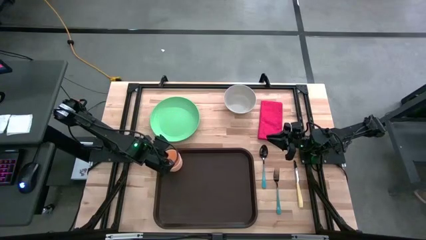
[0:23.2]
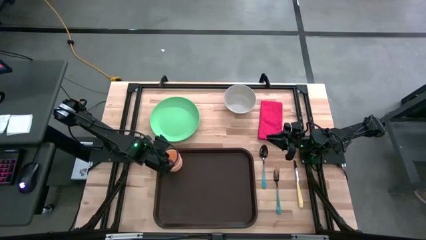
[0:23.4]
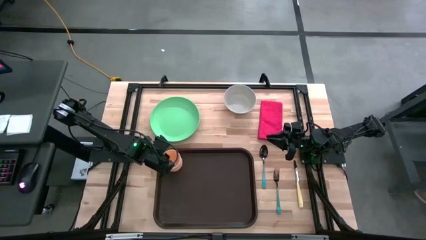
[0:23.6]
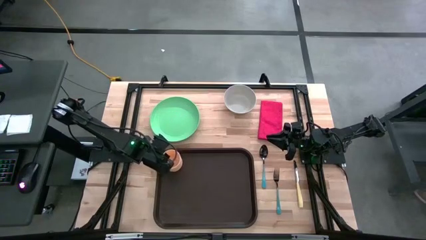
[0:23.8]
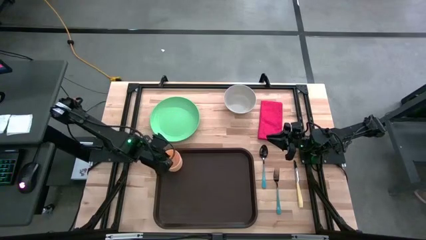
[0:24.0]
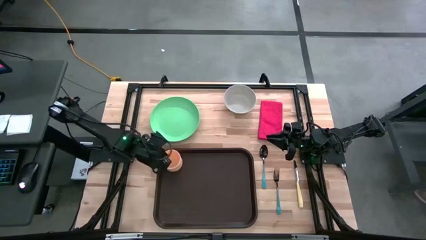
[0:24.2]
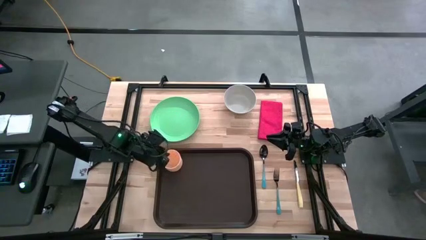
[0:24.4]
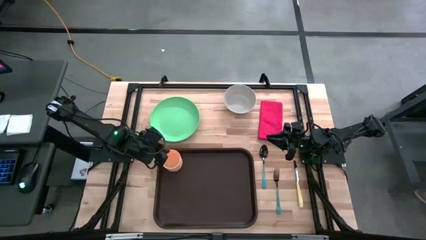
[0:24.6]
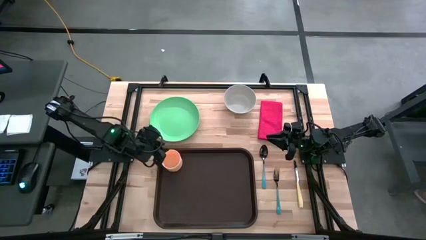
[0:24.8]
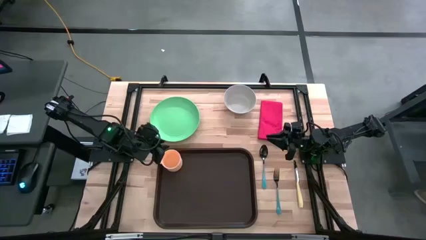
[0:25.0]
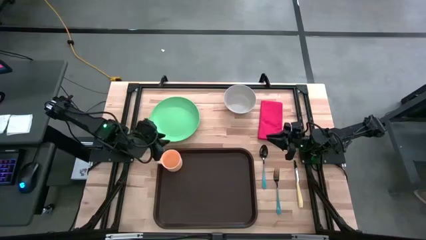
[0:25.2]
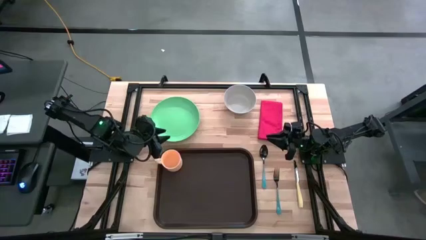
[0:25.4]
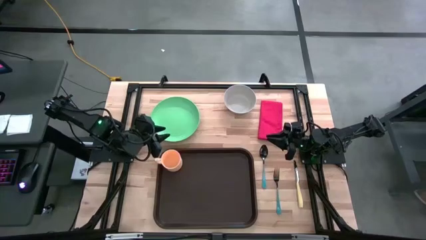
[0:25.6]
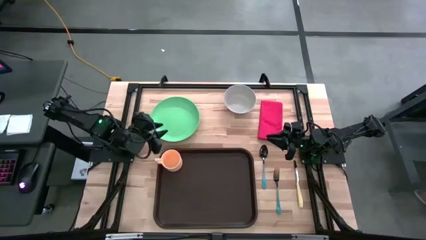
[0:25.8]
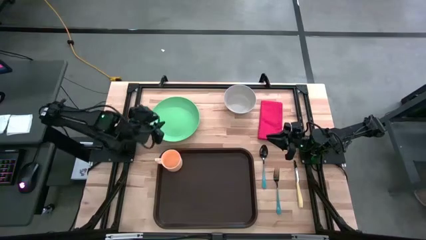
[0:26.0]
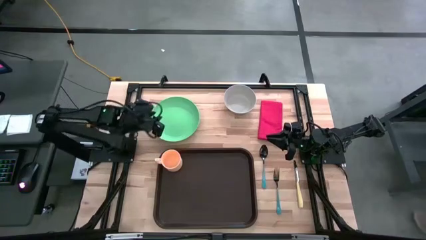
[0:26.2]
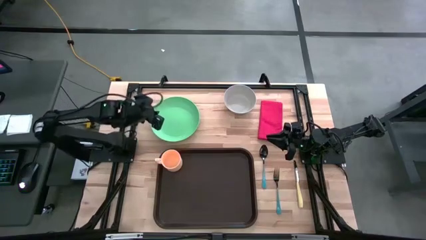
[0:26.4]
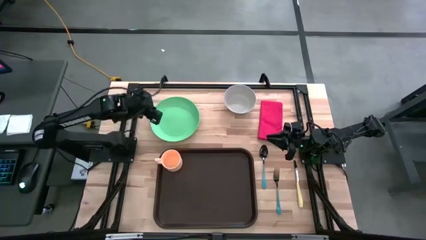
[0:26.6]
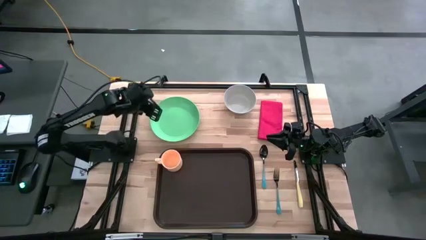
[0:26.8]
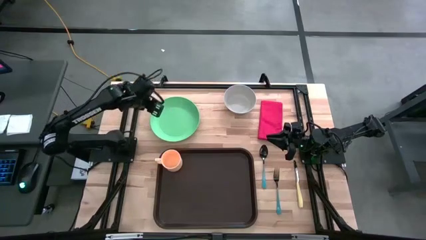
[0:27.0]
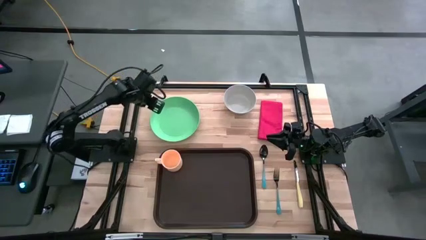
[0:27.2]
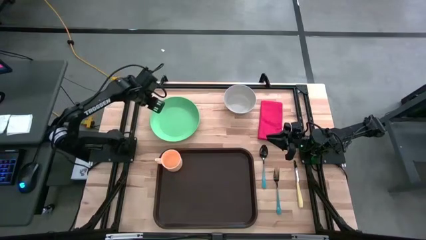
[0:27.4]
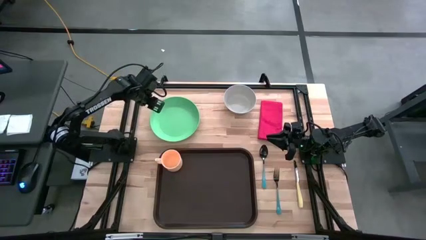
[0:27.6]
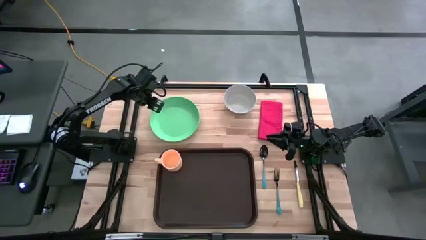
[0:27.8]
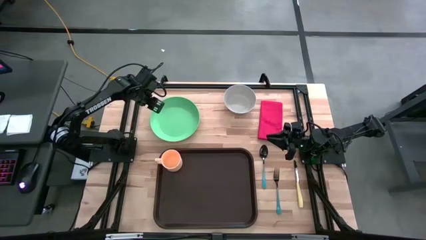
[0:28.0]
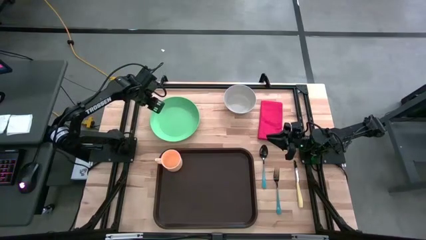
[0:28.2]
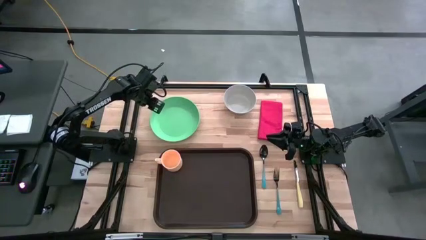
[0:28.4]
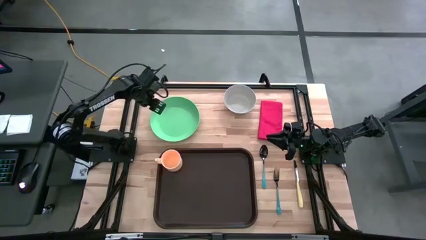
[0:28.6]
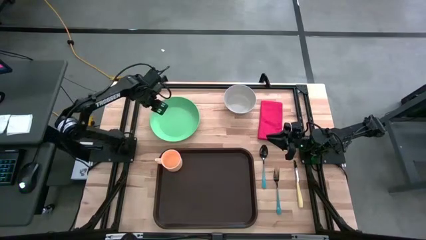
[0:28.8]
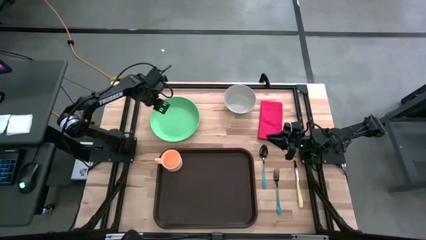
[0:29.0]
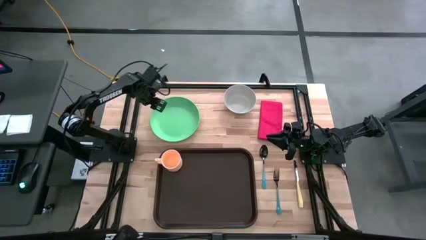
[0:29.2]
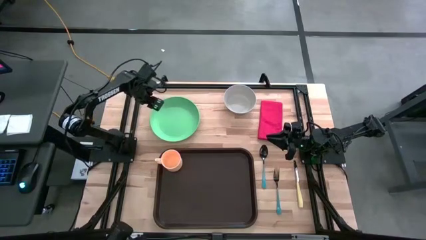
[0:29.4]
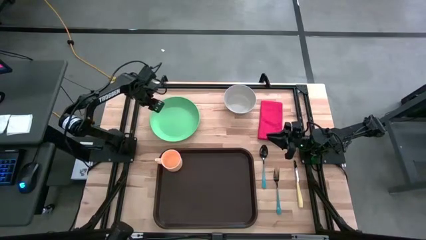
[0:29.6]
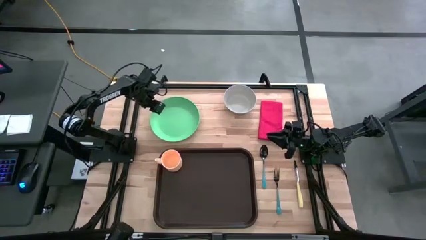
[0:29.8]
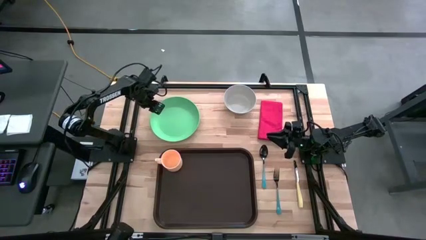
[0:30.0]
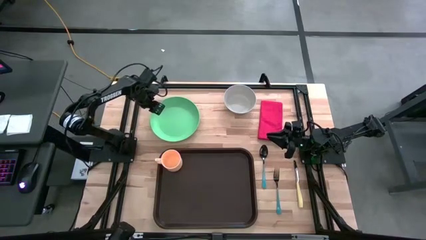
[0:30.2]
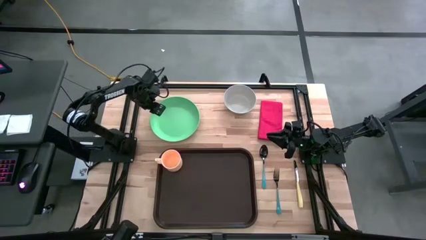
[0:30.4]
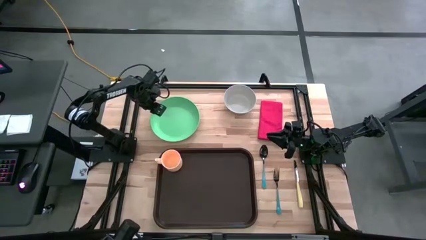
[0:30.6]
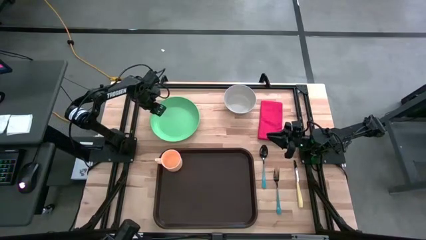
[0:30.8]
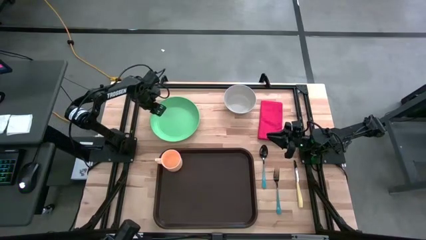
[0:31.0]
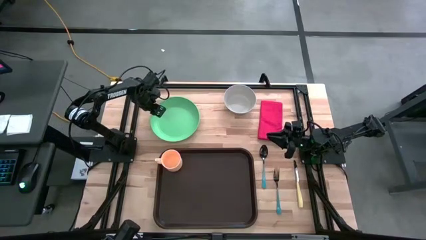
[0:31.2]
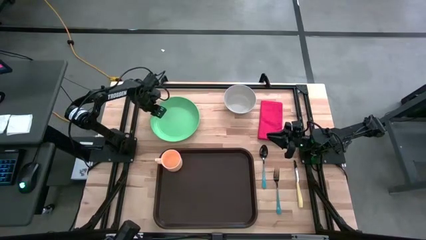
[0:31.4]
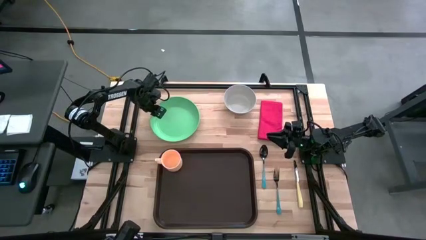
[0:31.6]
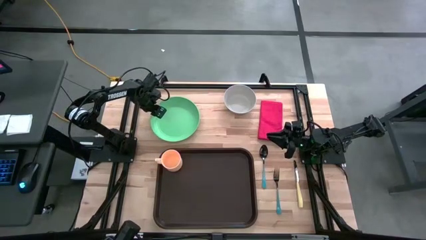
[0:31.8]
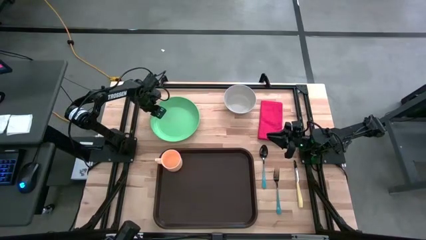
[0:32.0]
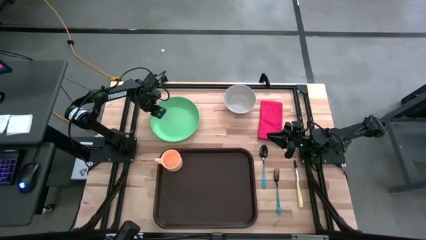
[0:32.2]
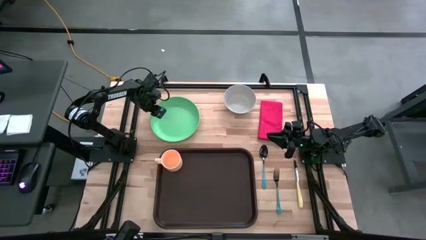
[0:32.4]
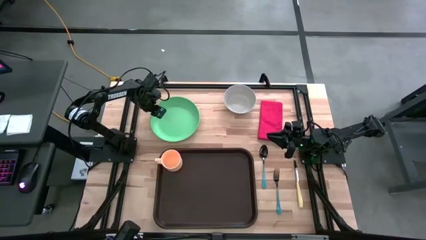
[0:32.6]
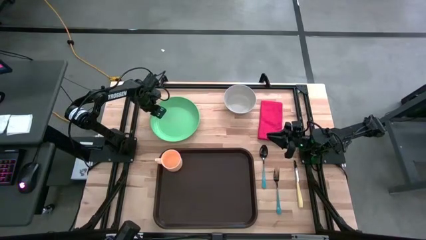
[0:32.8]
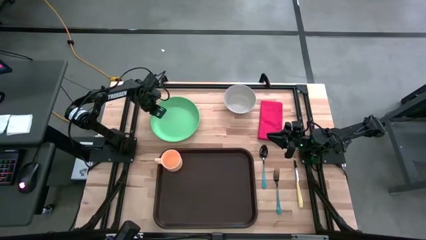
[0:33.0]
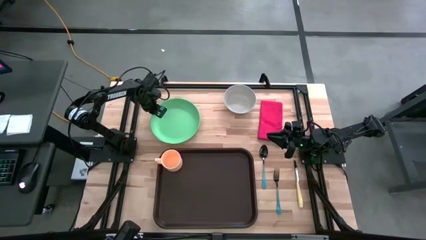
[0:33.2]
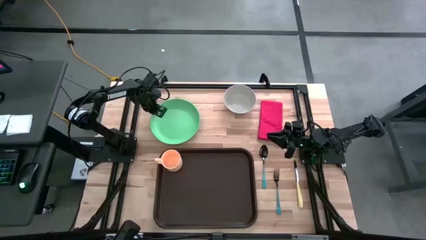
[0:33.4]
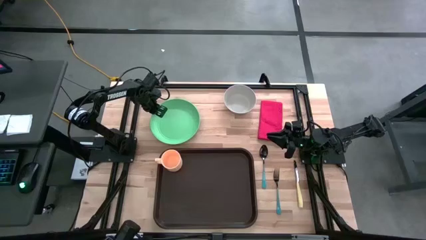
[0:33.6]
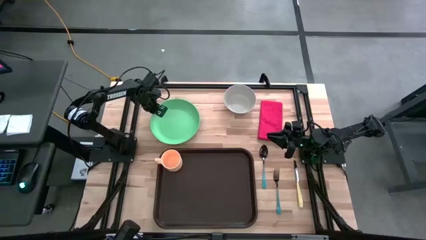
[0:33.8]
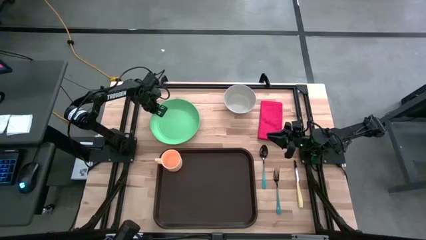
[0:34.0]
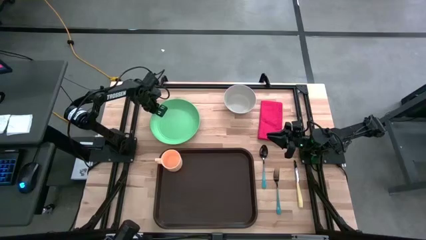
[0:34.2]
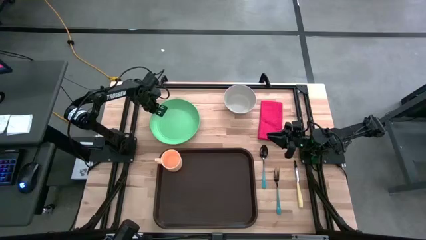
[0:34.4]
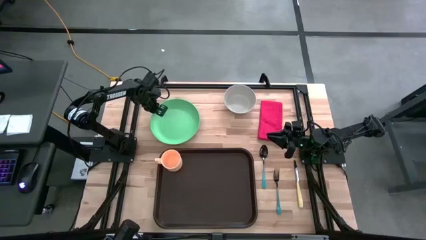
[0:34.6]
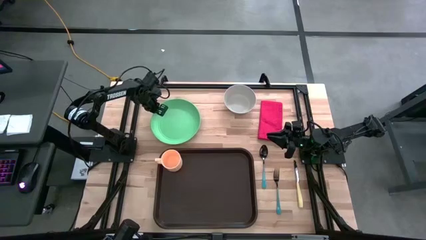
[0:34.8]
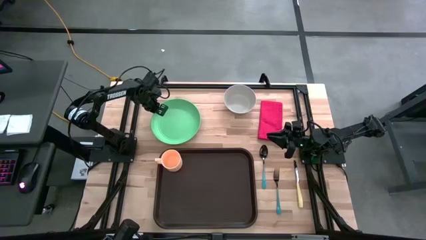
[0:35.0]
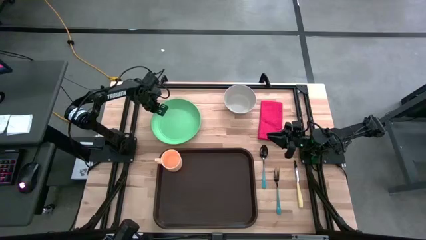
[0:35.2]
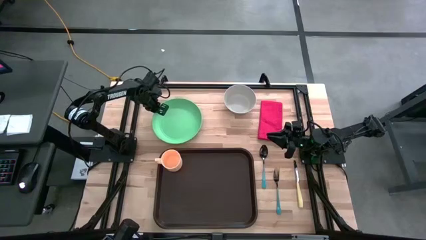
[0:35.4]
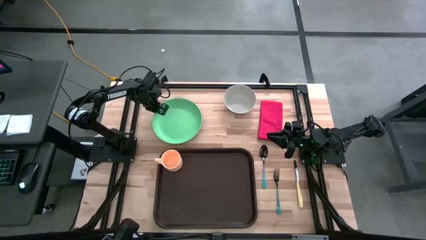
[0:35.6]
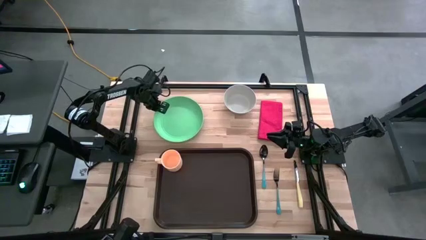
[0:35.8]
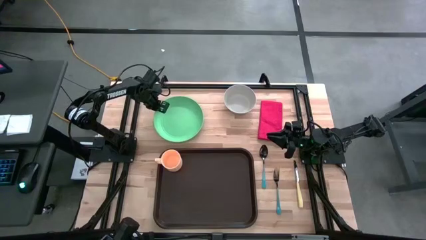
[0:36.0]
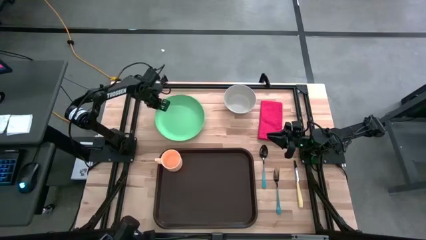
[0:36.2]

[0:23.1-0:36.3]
Task: Set up tray
Put the green plate to the bottom right of the orange cup on the brown tray

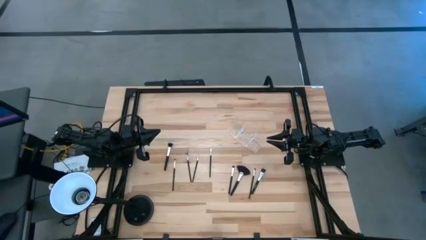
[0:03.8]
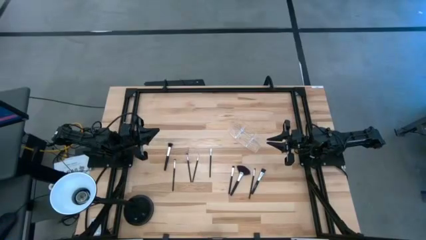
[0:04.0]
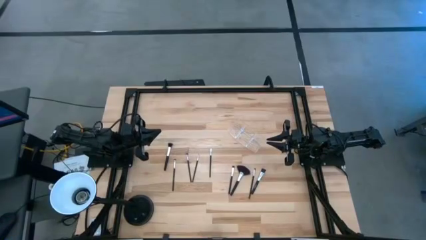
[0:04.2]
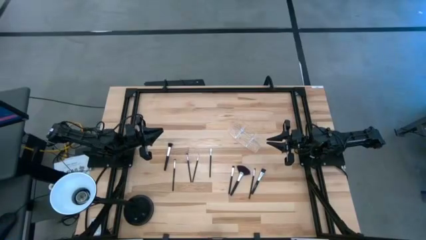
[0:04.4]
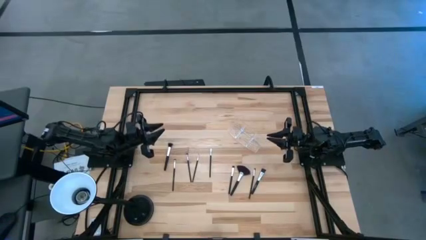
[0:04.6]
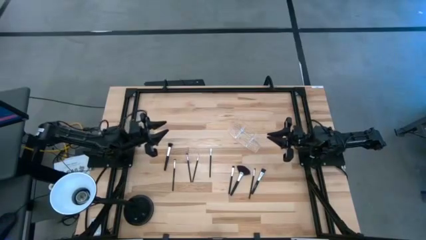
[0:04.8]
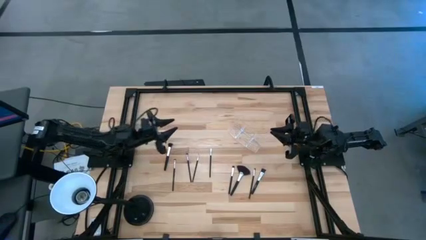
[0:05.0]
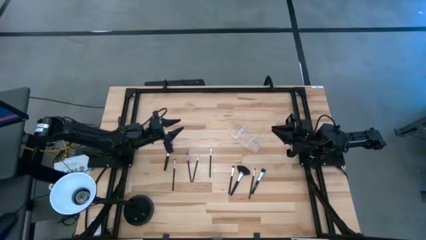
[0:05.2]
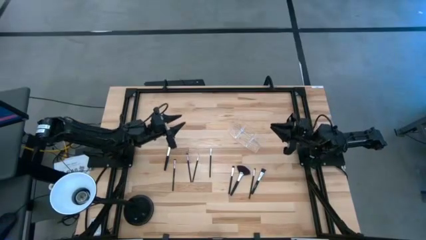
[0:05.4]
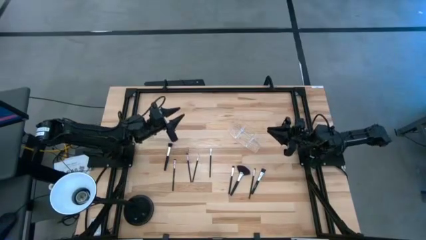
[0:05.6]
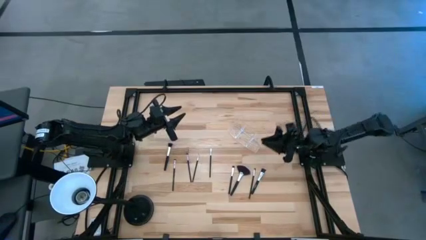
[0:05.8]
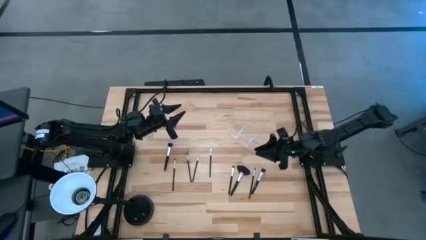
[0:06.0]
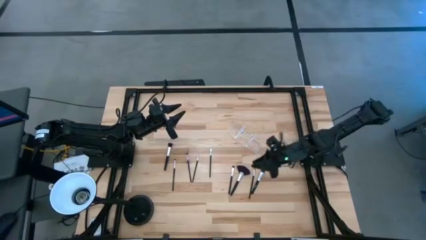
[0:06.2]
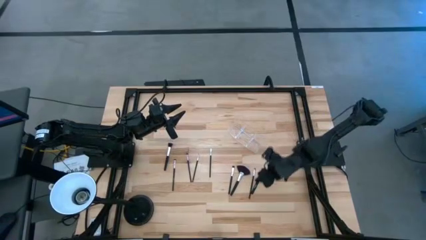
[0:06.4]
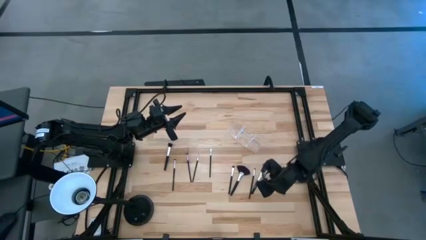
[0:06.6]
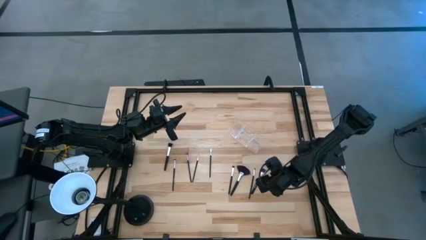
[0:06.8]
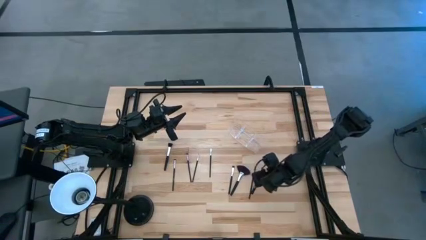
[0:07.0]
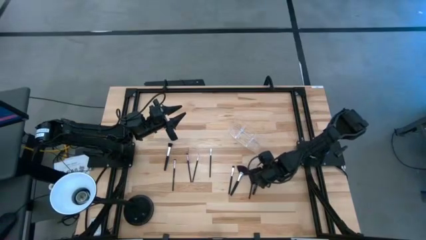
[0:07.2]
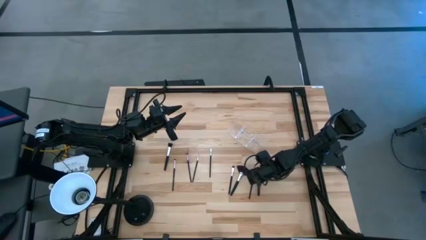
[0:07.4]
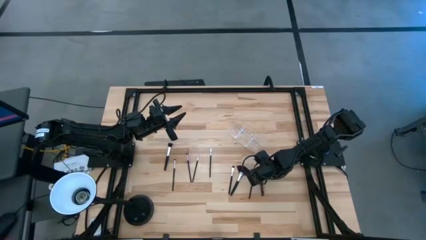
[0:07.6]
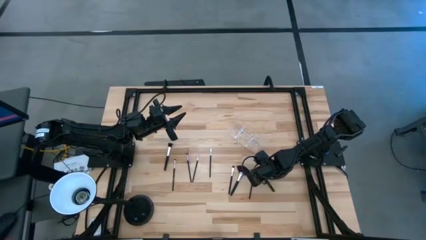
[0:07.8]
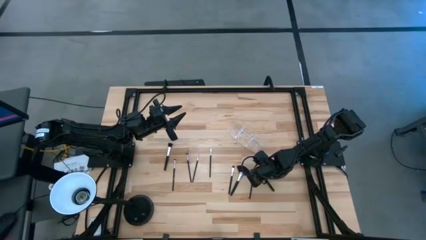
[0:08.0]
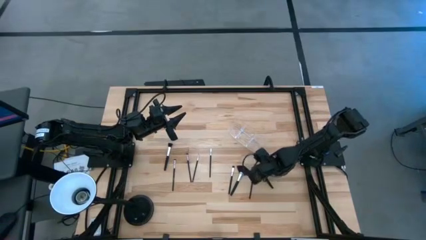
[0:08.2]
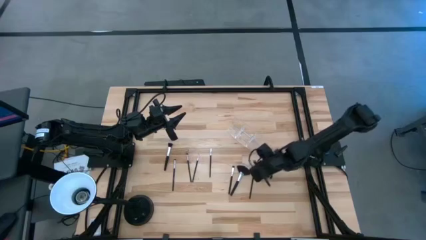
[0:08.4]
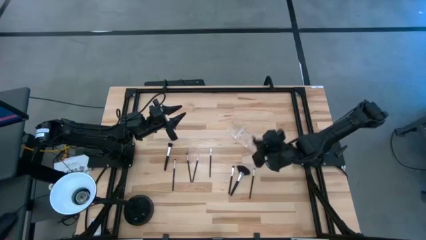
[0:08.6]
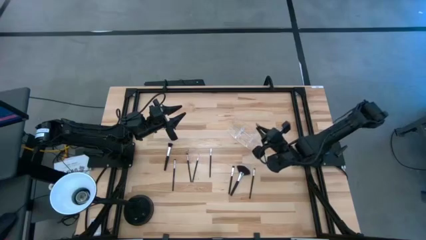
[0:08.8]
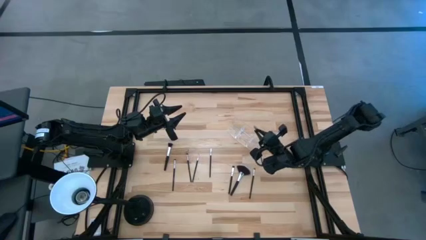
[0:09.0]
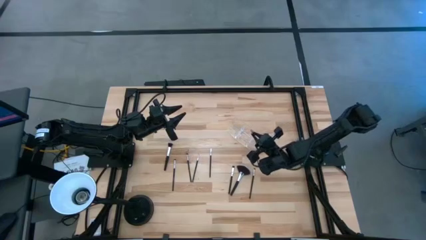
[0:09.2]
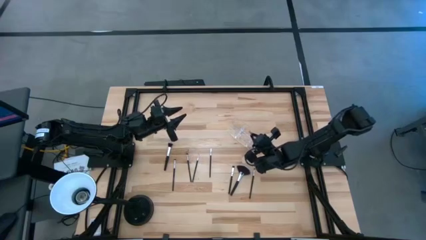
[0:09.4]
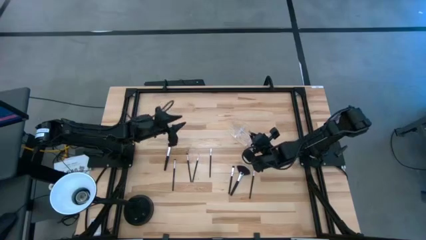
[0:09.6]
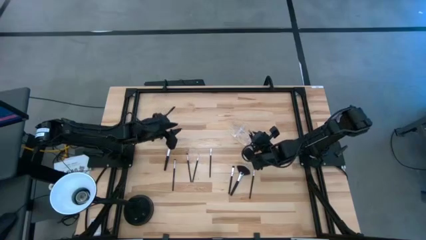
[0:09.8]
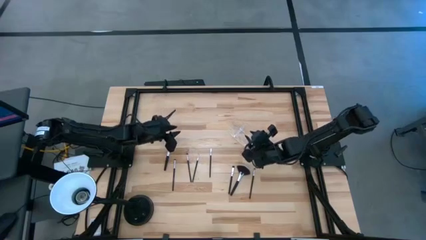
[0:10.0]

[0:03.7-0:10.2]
Task: Put items in baskets/containers
Put the foundation brush into the transparent organizer
